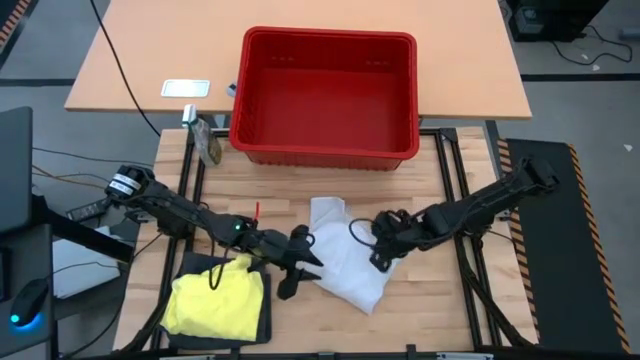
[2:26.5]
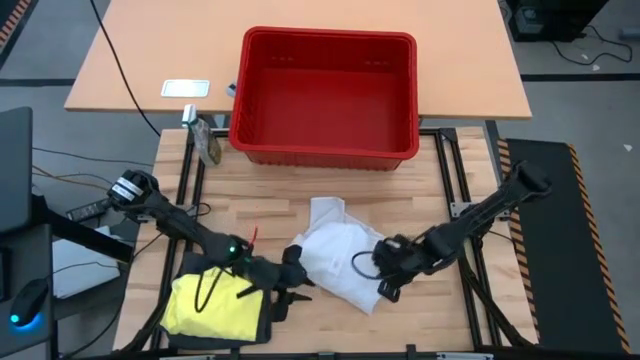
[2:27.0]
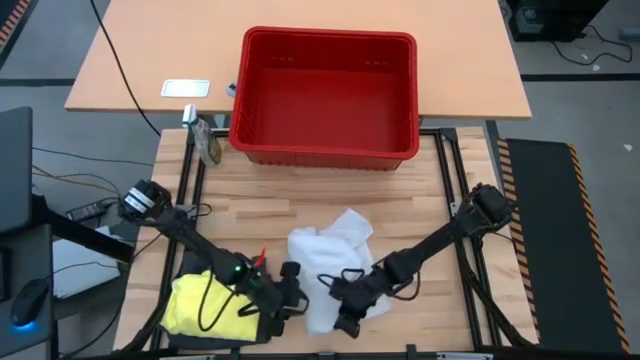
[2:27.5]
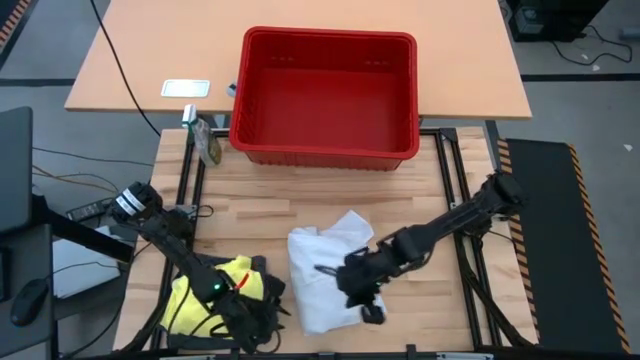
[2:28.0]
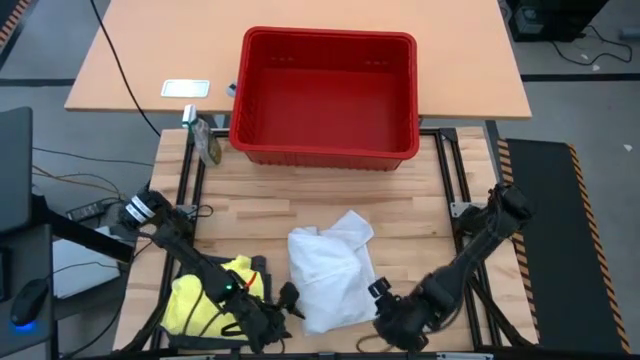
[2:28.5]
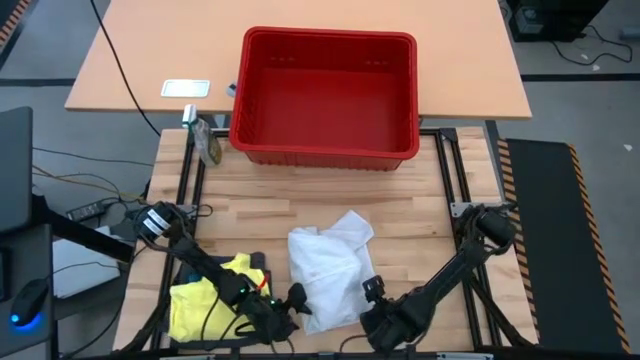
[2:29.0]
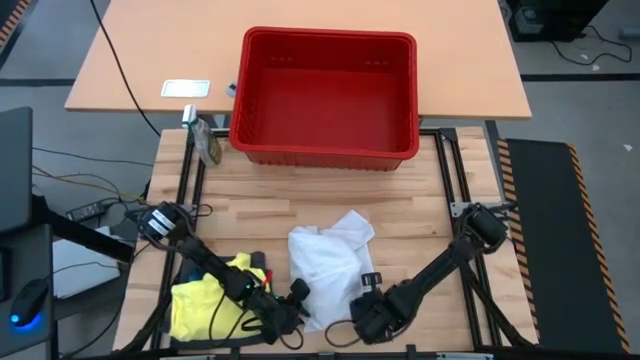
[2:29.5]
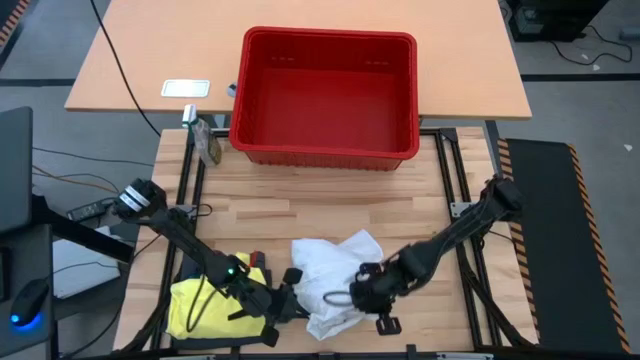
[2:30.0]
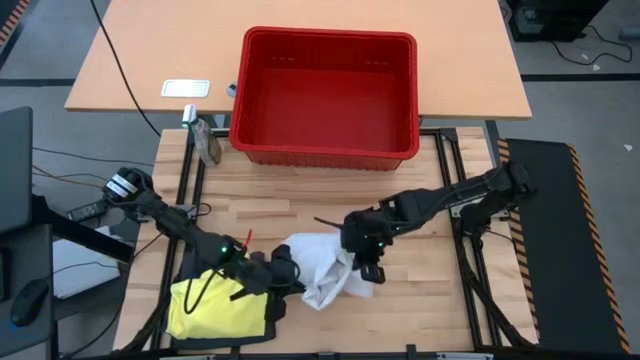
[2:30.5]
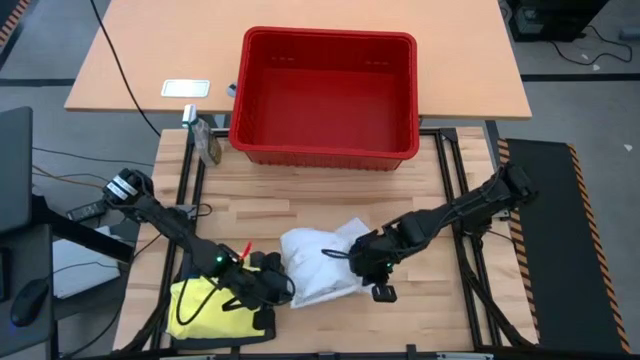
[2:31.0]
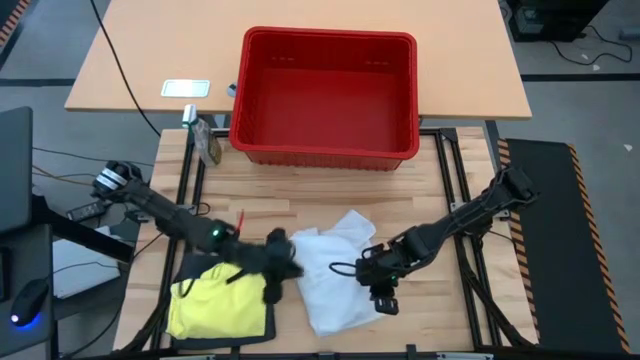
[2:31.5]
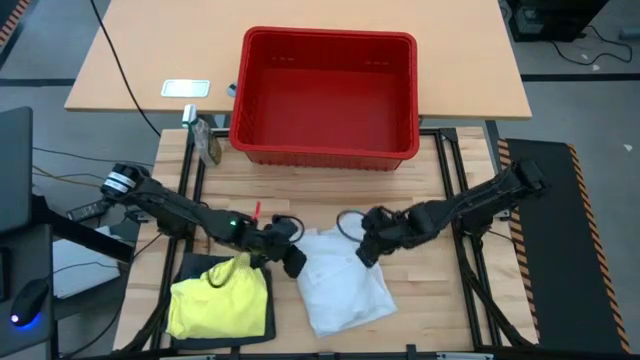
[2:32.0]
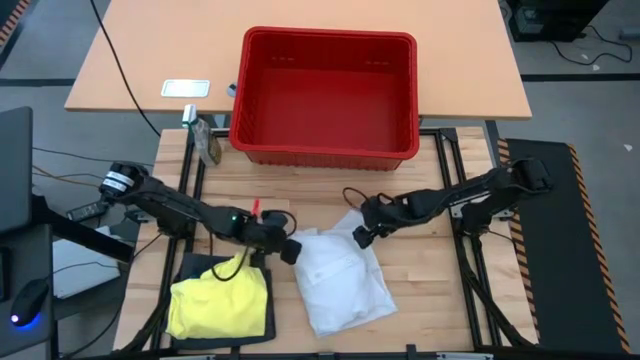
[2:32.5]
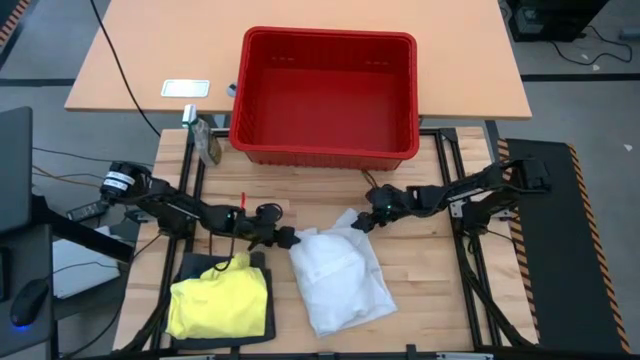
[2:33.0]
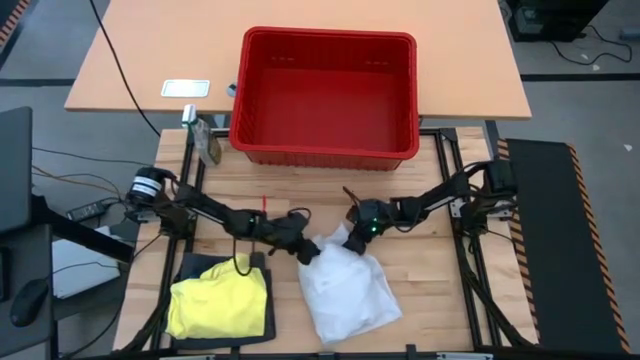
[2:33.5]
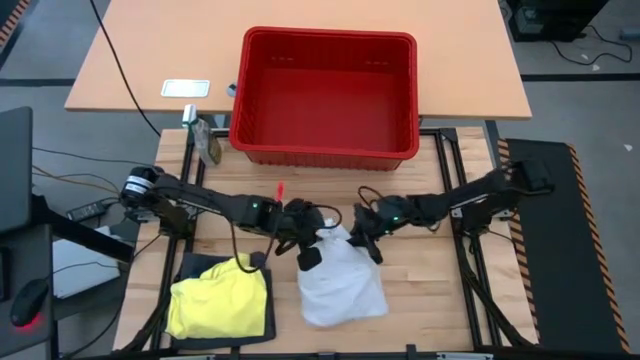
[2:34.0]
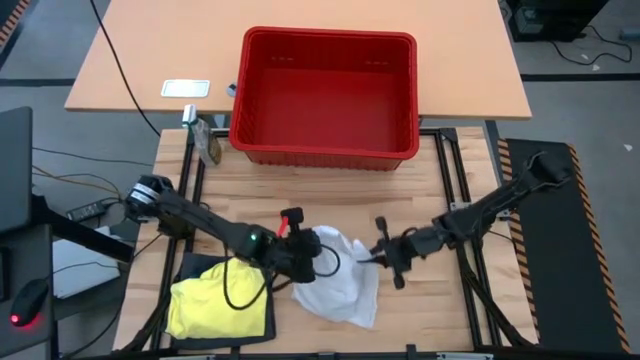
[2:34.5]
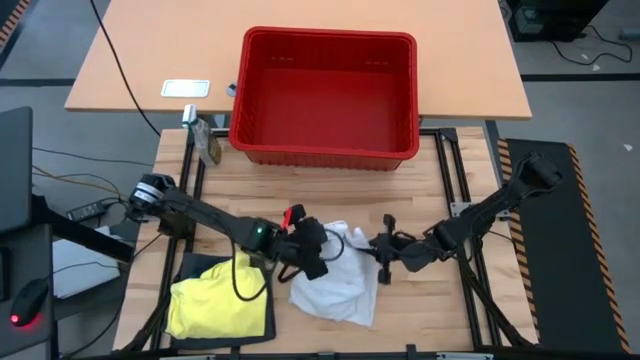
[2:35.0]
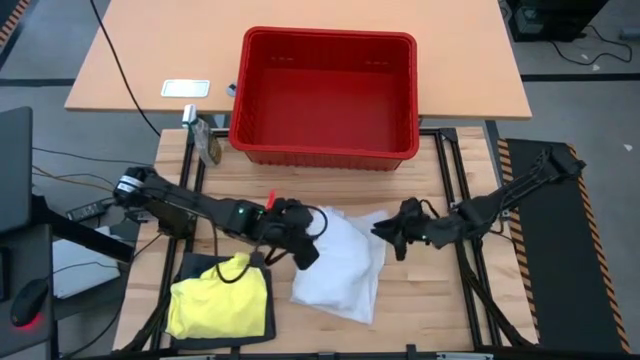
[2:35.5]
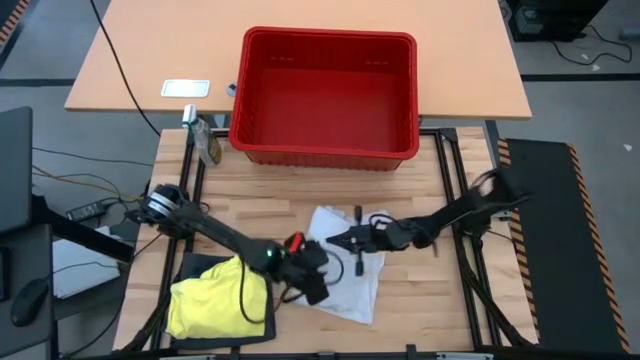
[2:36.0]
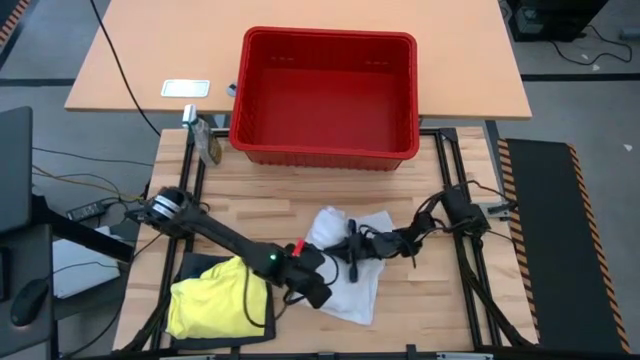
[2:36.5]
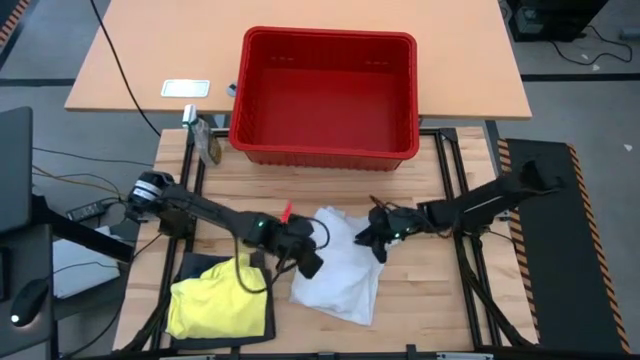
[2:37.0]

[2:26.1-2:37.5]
Task: Fold laundry
Fold the white polo shirt

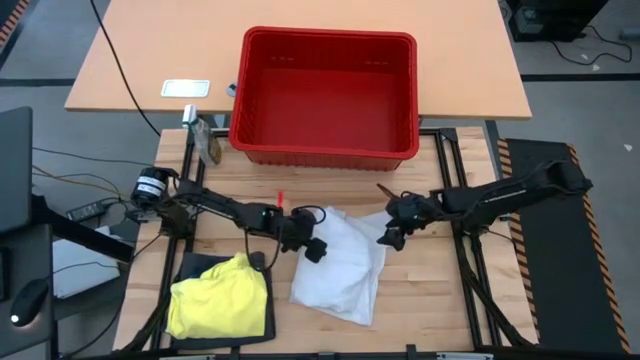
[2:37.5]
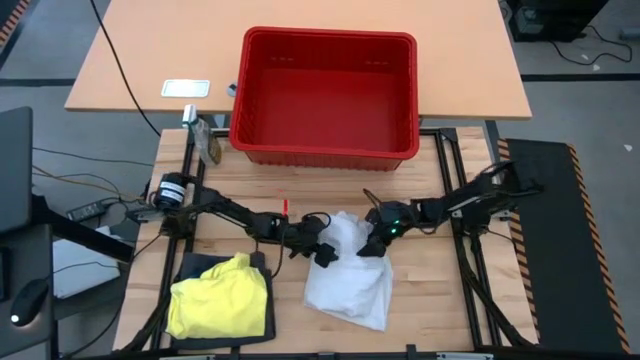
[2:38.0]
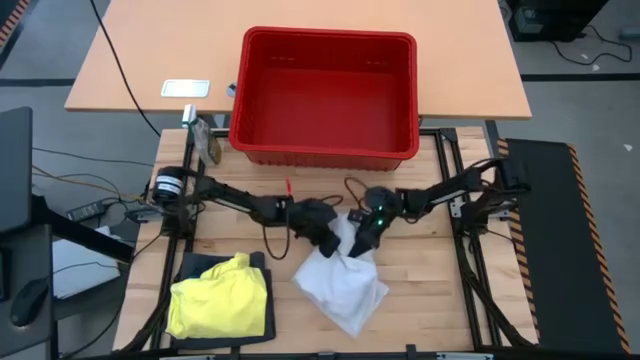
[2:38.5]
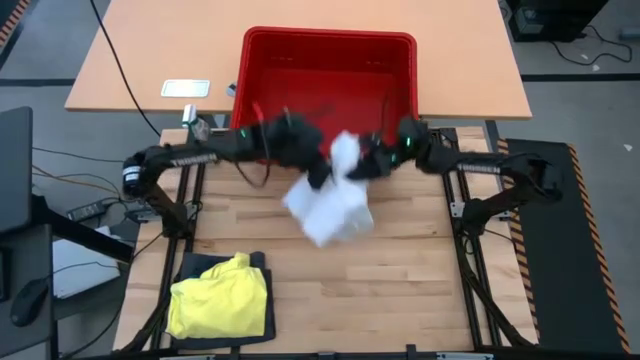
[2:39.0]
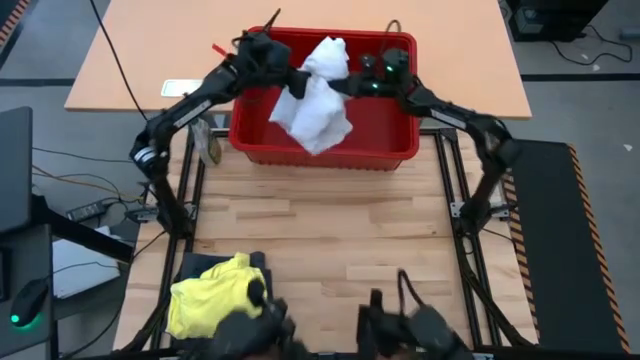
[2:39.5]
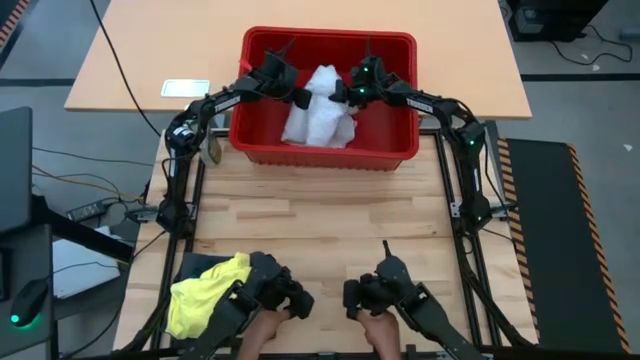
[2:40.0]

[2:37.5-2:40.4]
Put the white polo shirt into the red bin

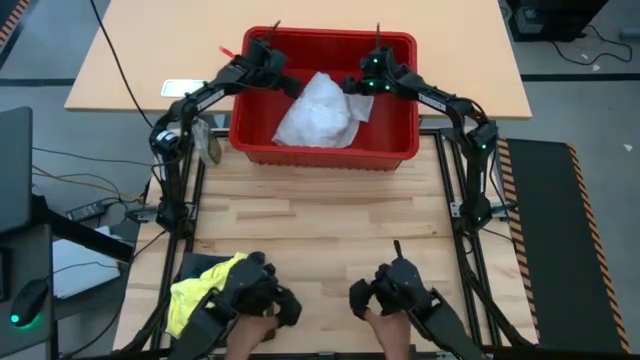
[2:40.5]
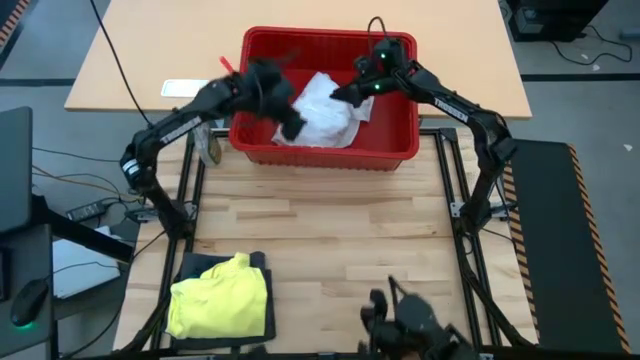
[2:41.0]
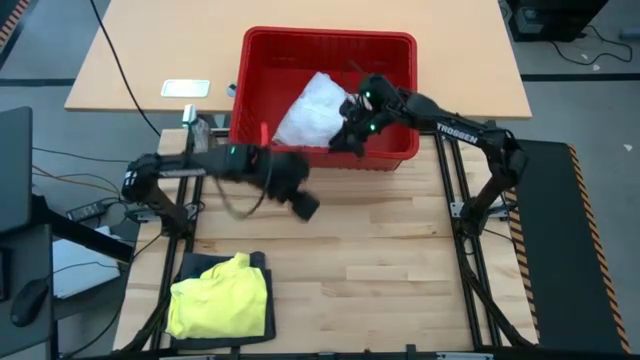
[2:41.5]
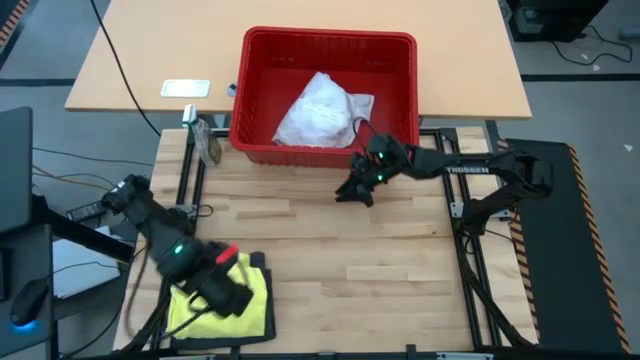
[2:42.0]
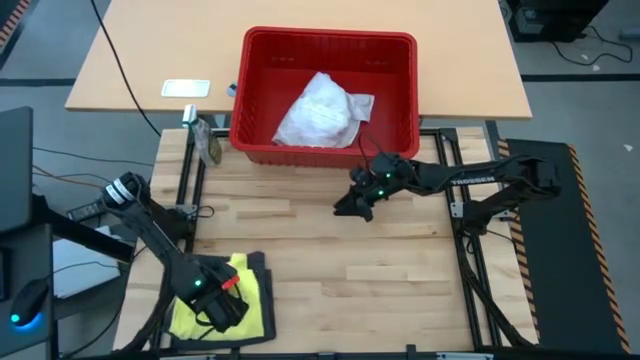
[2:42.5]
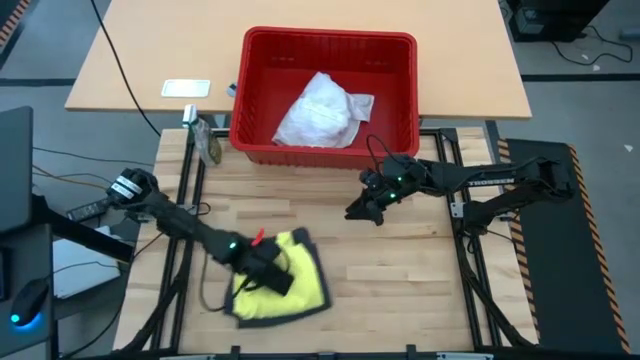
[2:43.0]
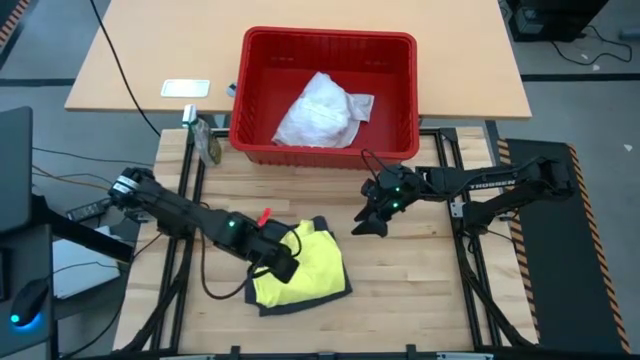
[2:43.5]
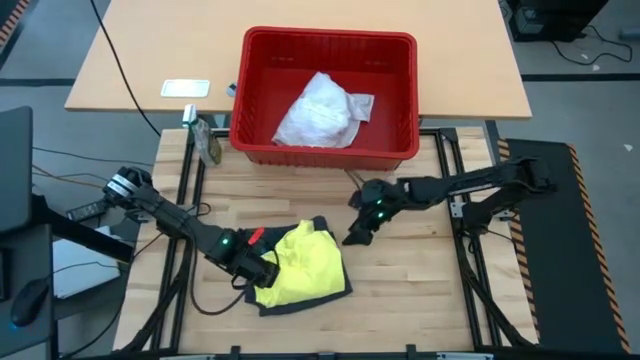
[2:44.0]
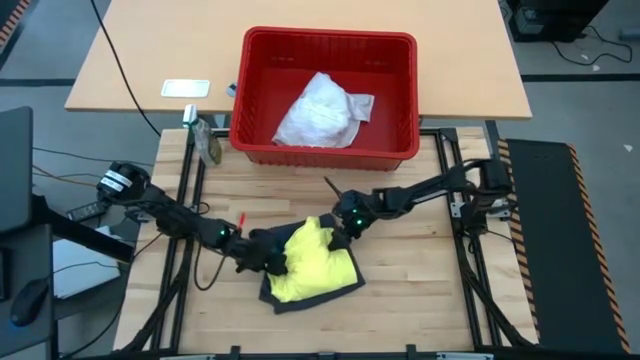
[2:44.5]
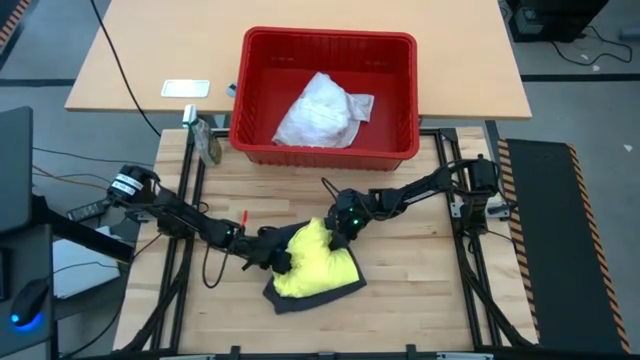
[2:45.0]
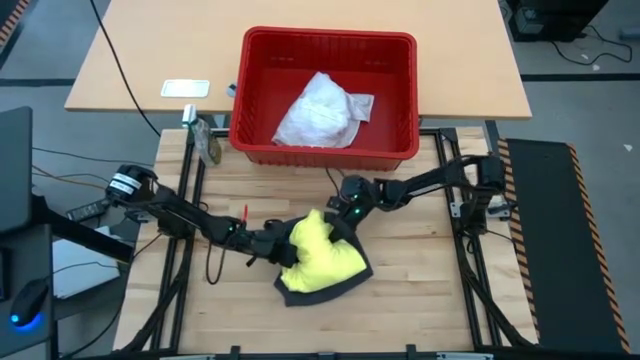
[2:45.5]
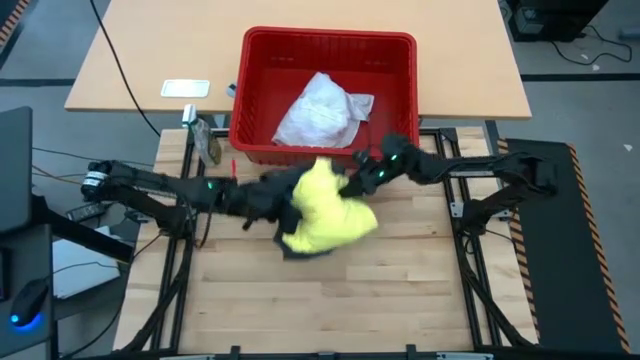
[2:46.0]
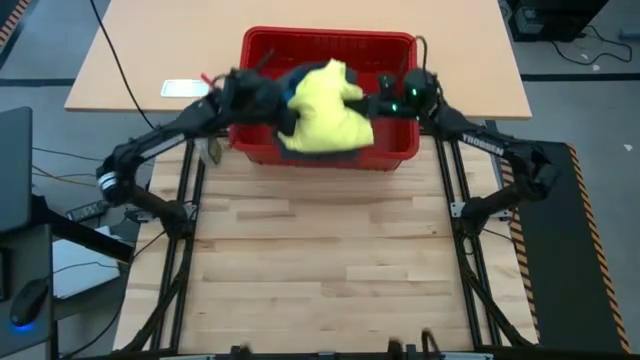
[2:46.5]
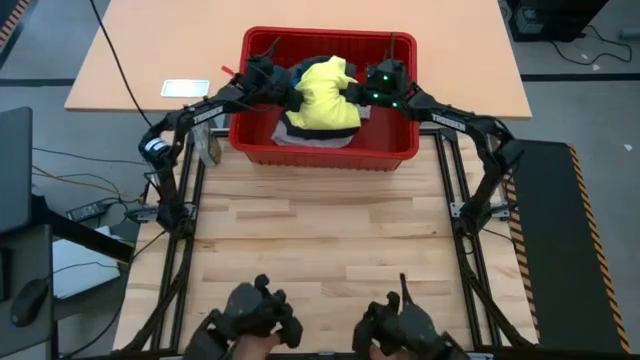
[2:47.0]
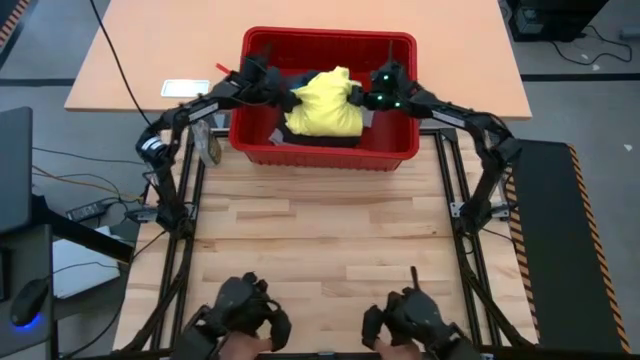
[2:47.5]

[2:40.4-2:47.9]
Put the stack of clothes into the red bin
